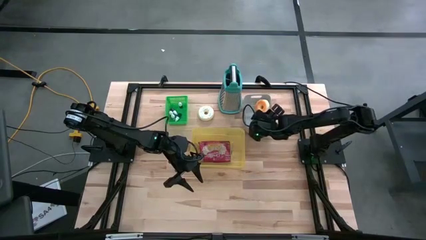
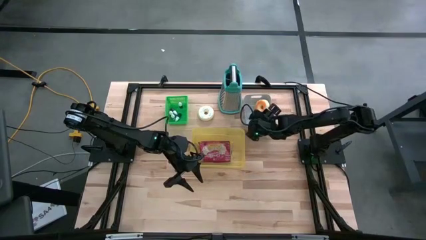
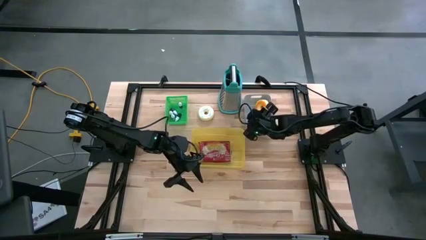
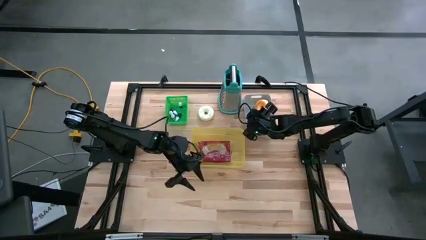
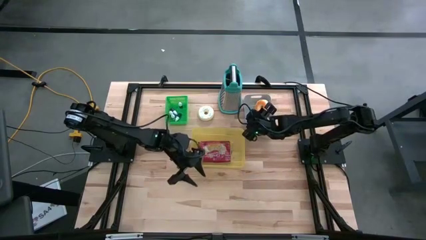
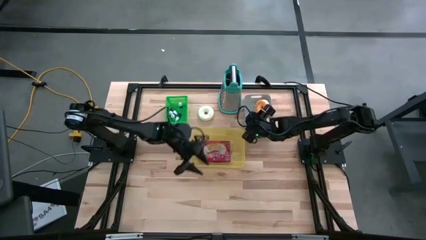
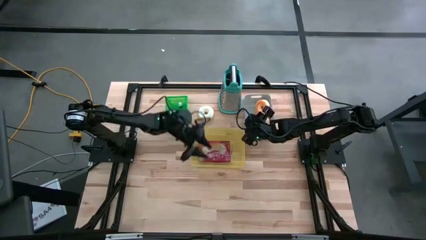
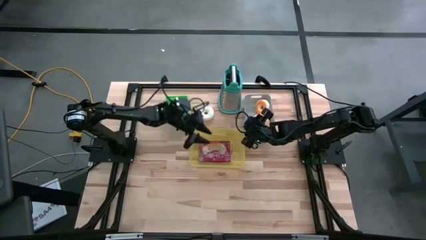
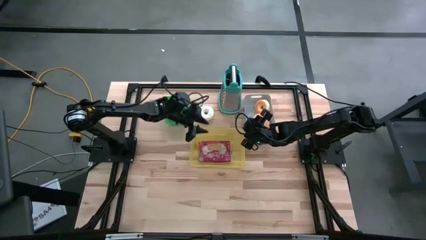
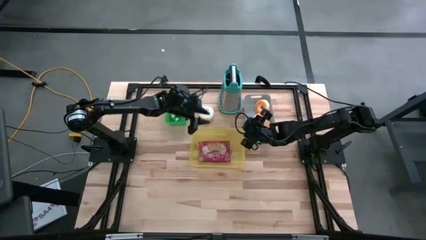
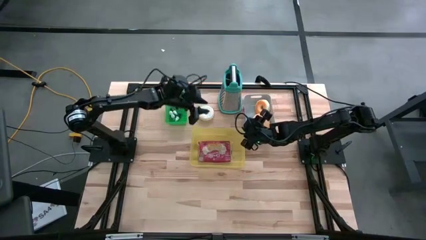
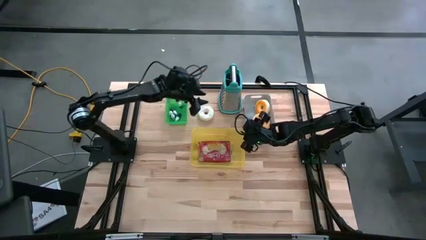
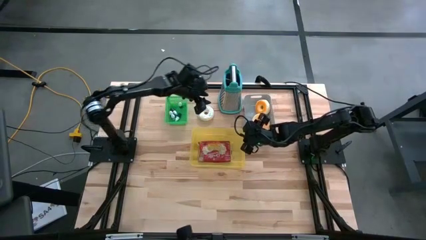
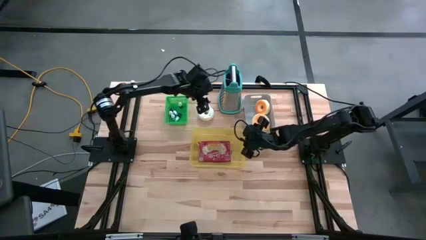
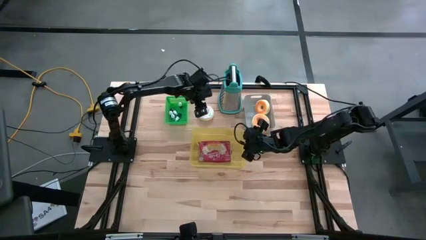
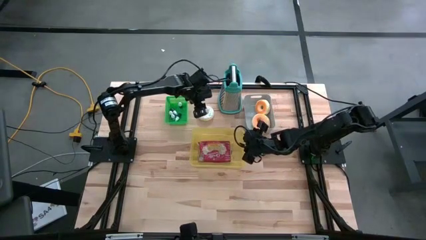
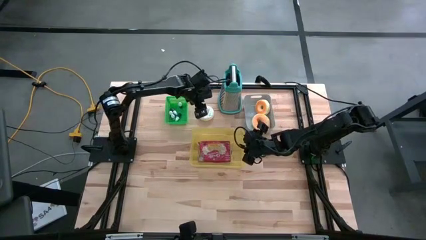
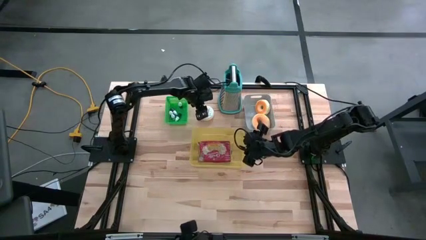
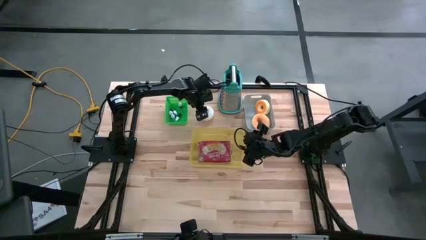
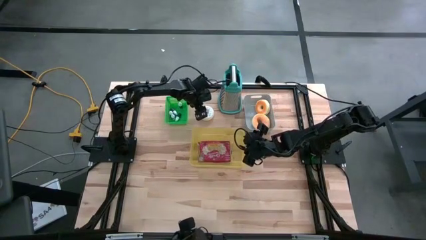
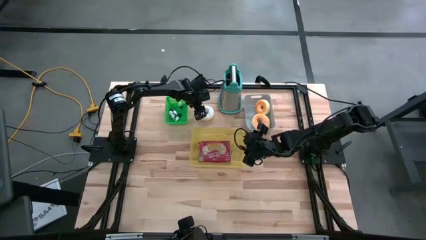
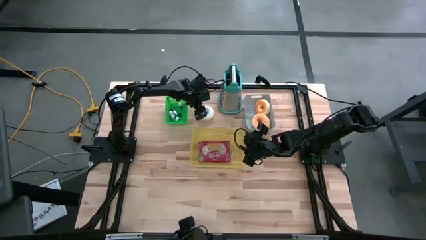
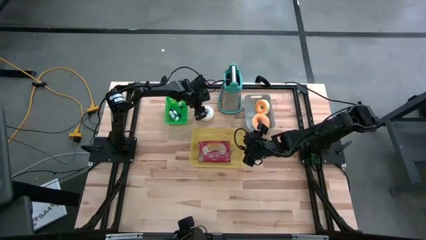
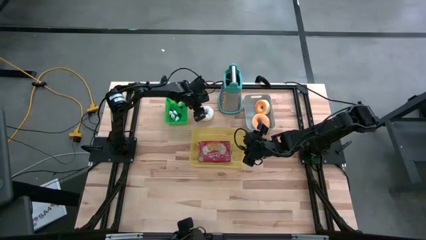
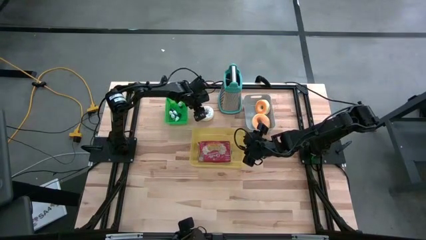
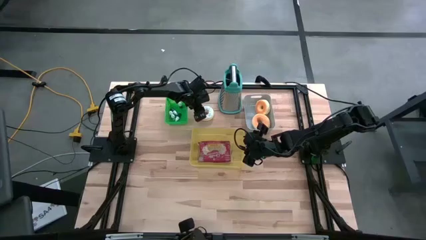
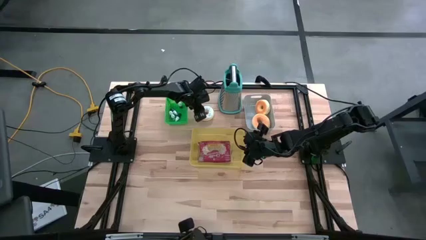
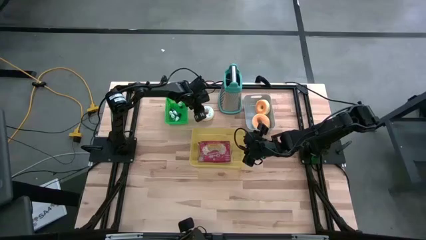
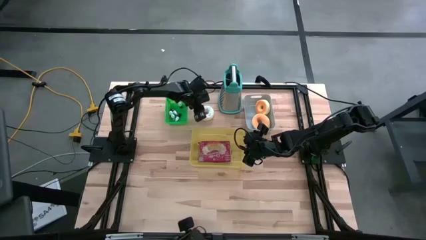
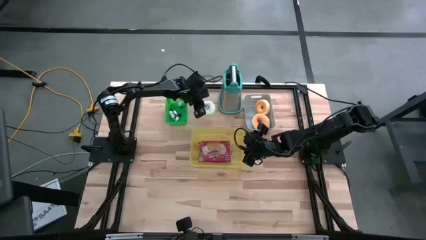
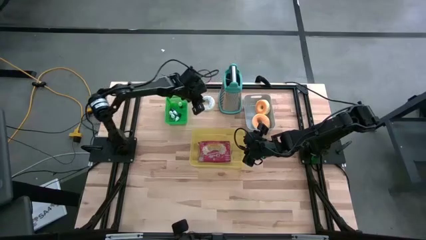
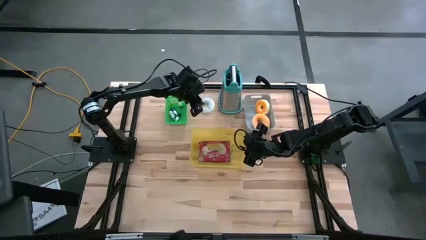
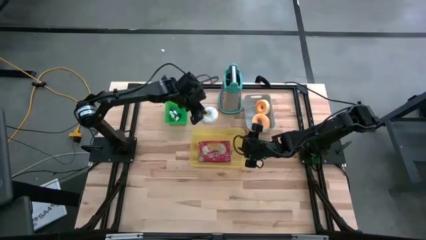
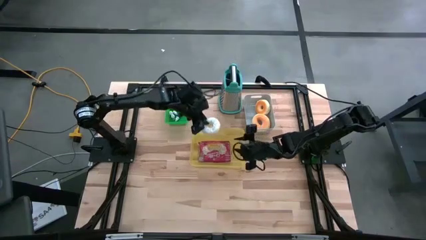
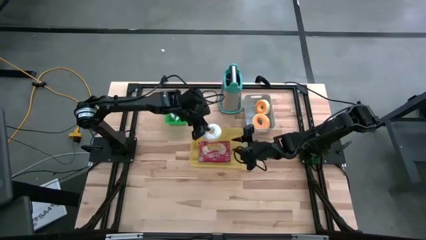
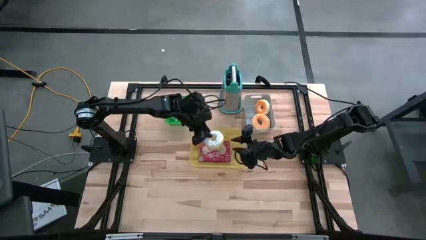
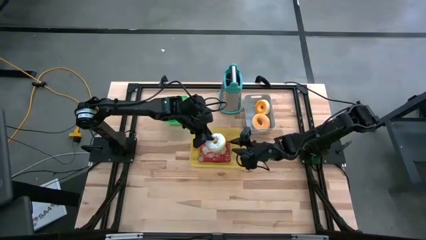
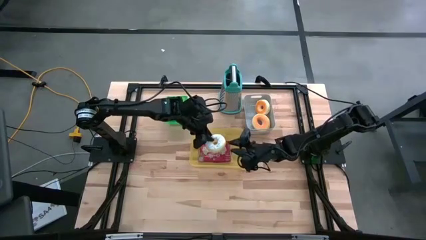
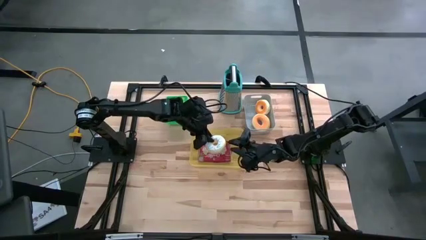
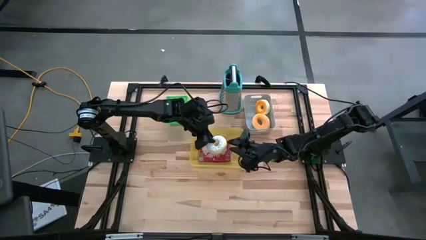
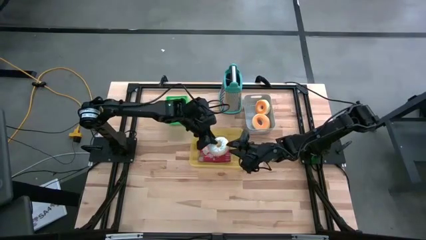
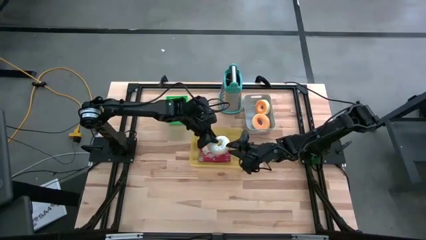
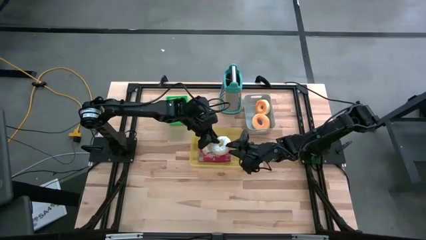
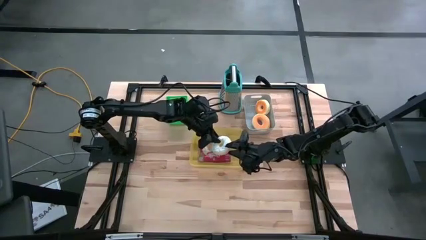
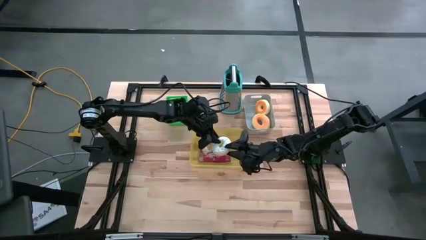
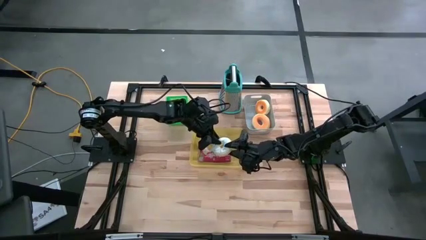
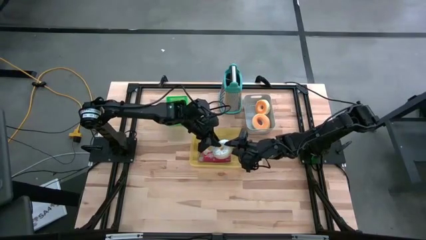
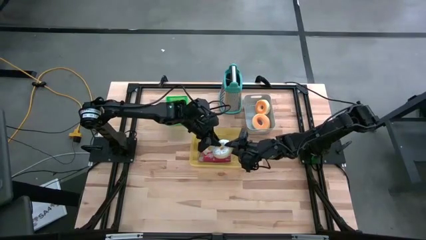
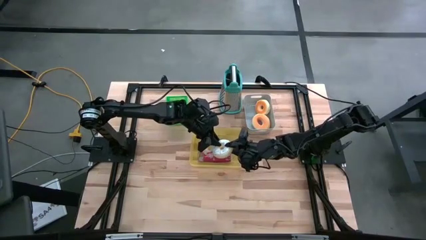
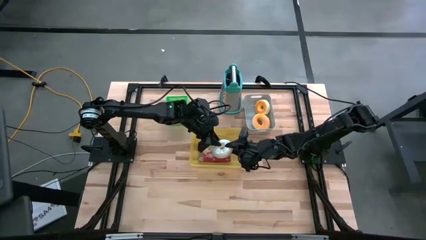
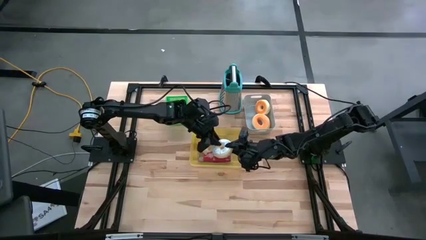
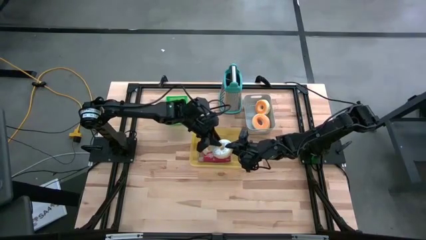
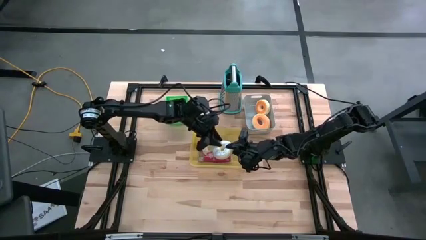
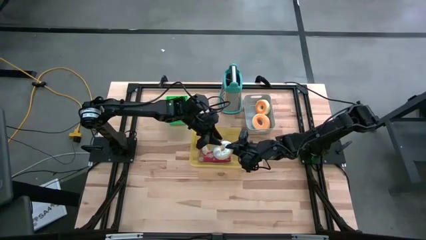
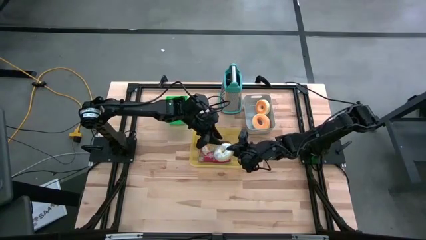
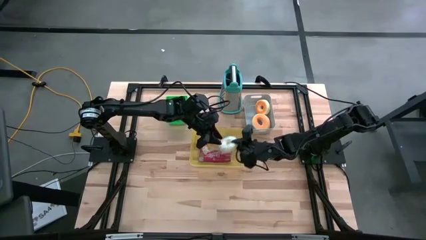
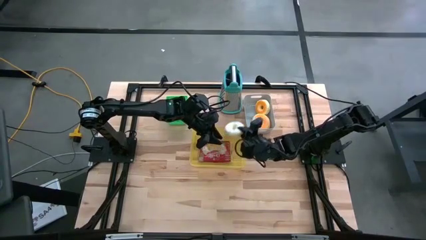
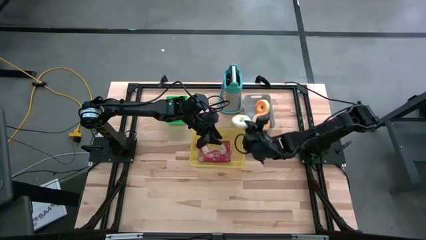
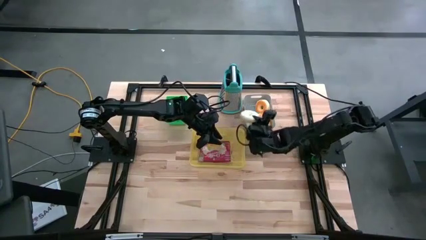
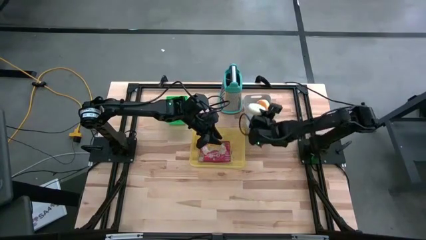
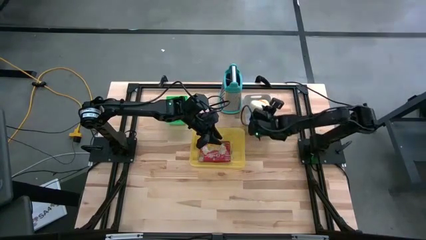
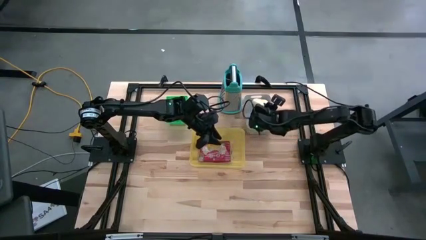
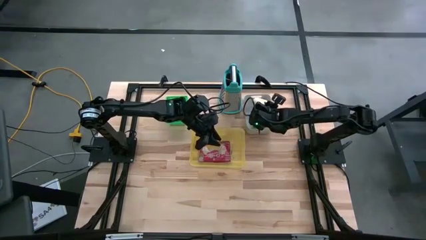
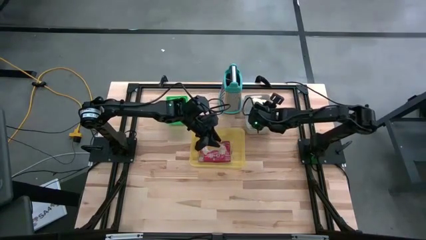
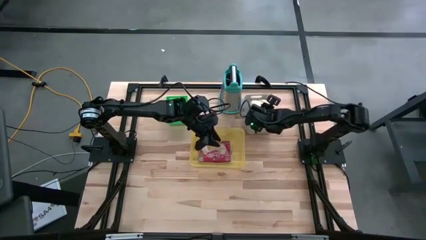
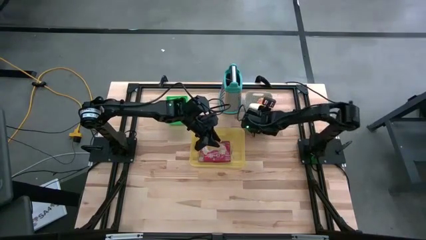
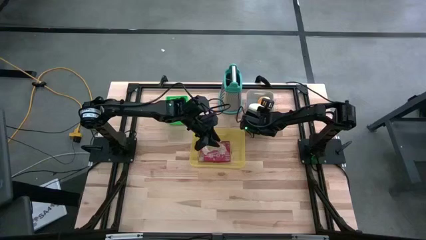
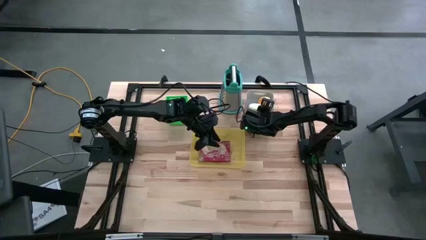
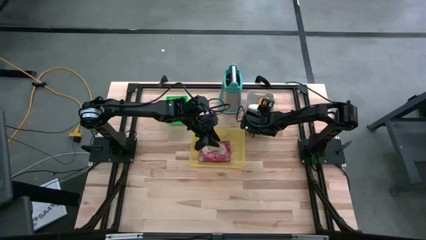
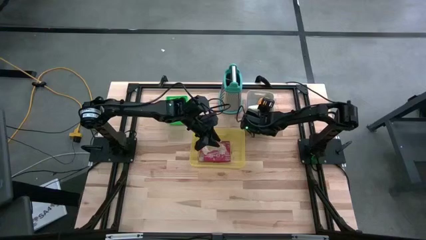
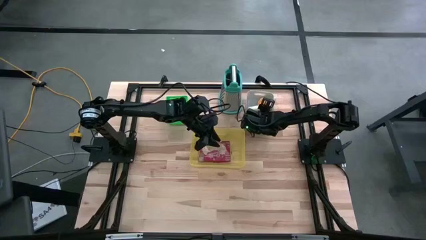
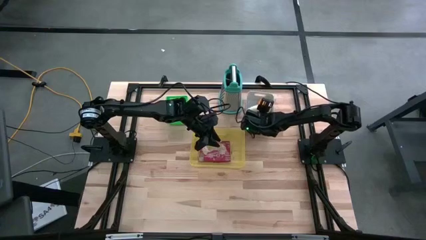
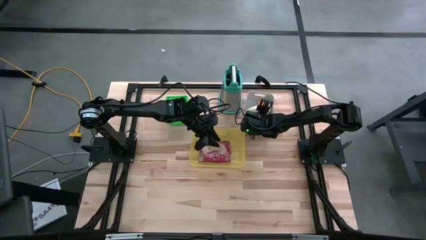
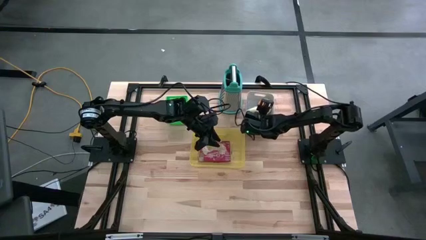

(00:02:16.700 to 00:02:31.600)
Put the white donut into the gray bin
